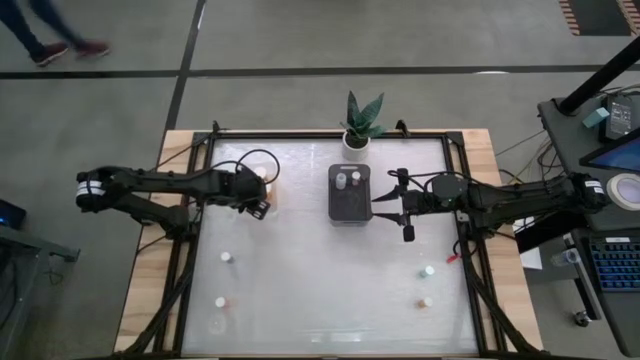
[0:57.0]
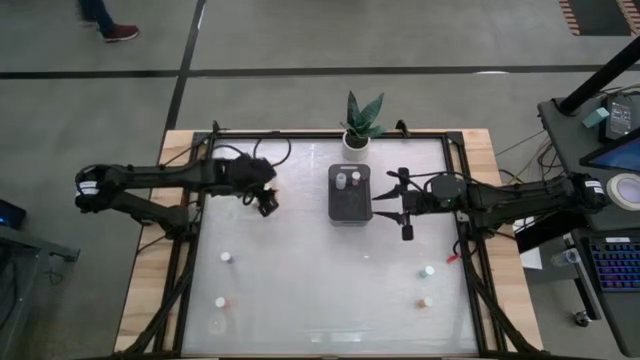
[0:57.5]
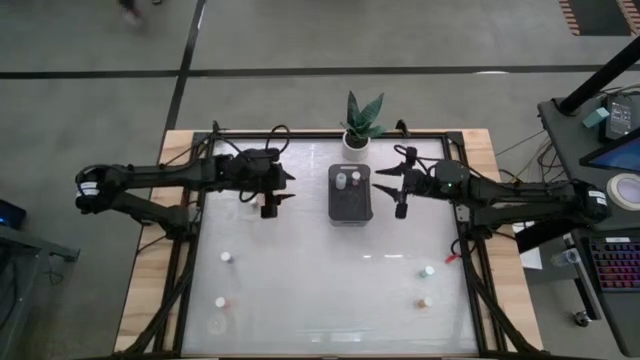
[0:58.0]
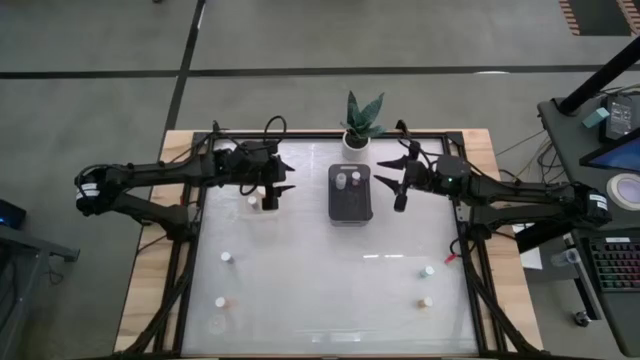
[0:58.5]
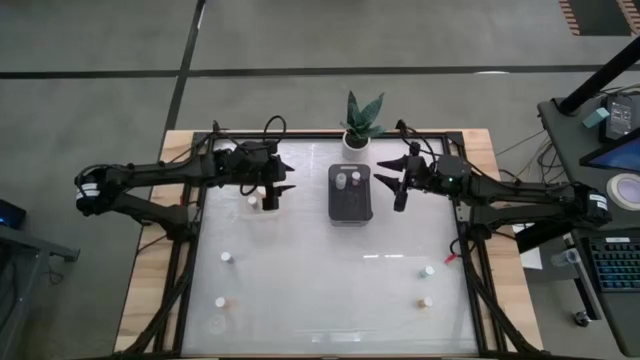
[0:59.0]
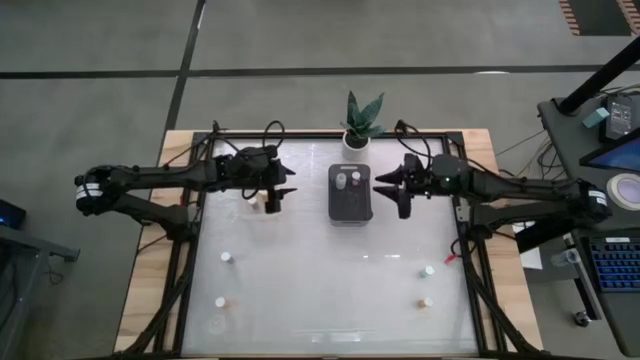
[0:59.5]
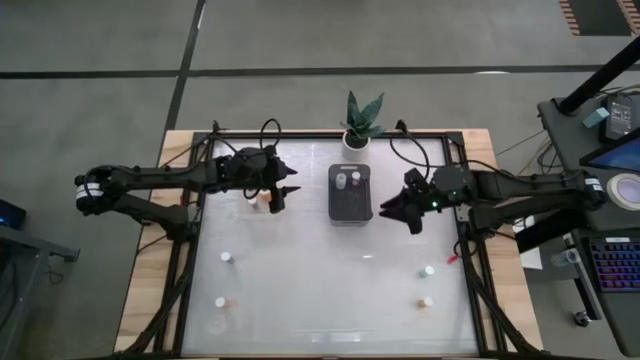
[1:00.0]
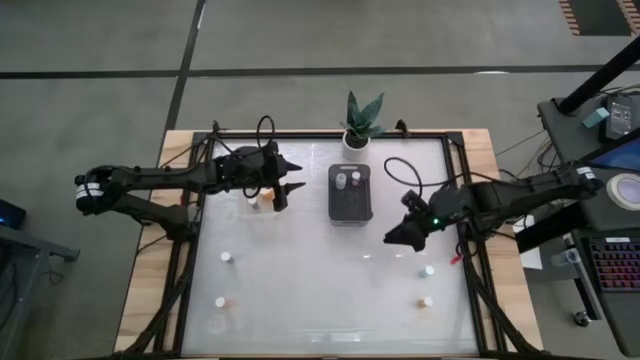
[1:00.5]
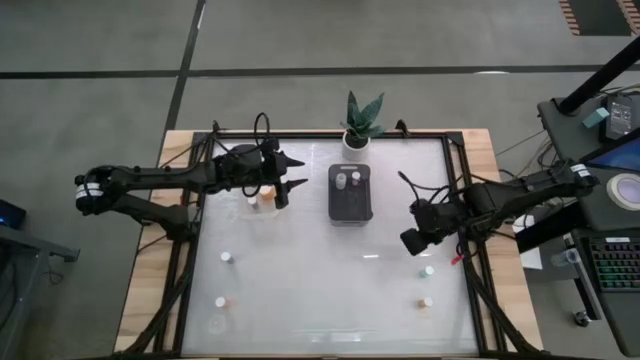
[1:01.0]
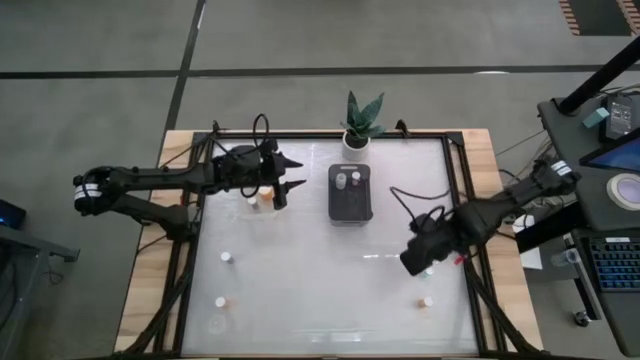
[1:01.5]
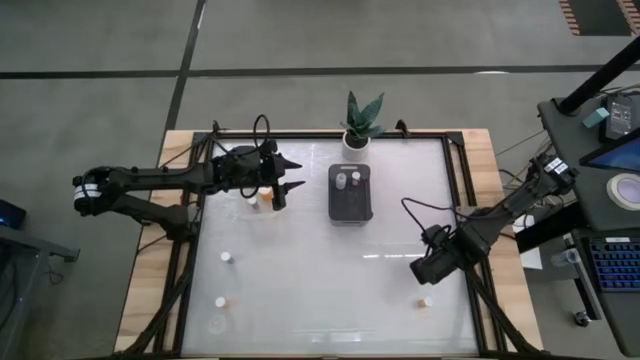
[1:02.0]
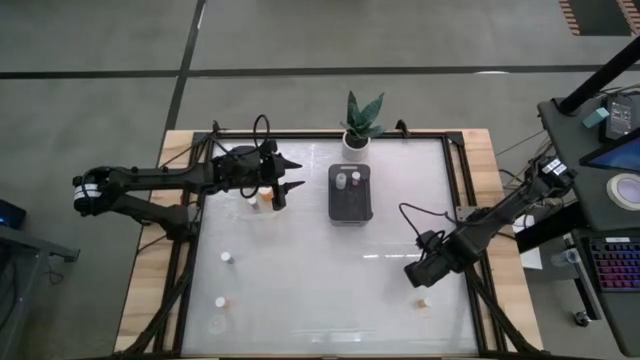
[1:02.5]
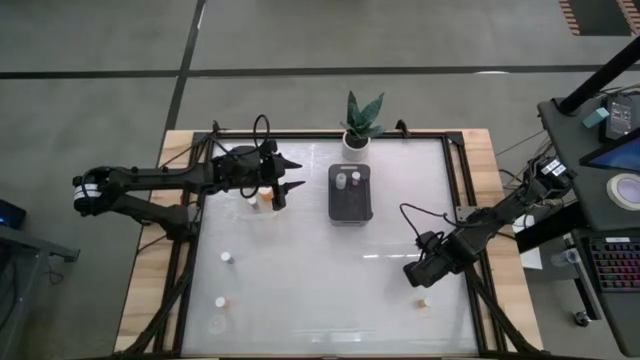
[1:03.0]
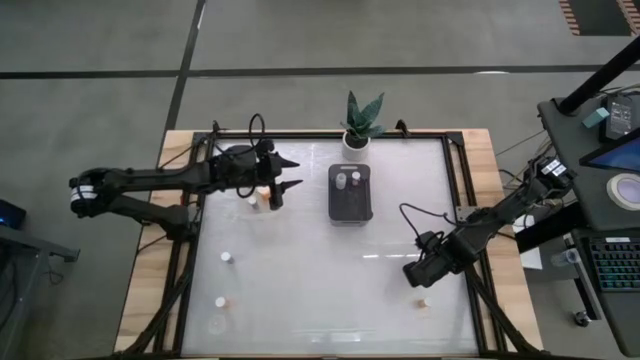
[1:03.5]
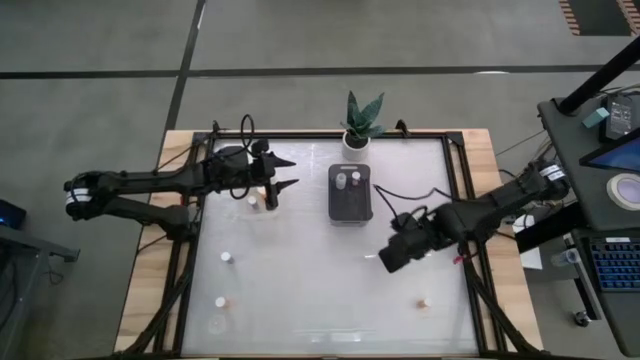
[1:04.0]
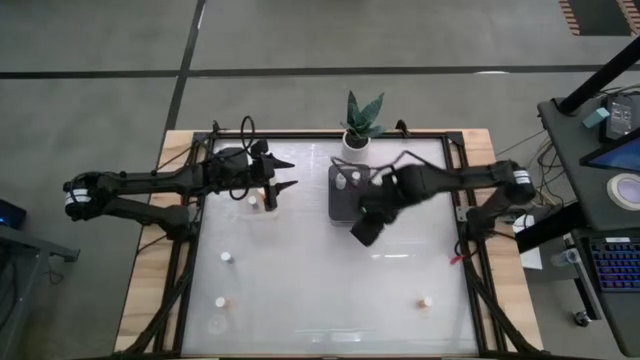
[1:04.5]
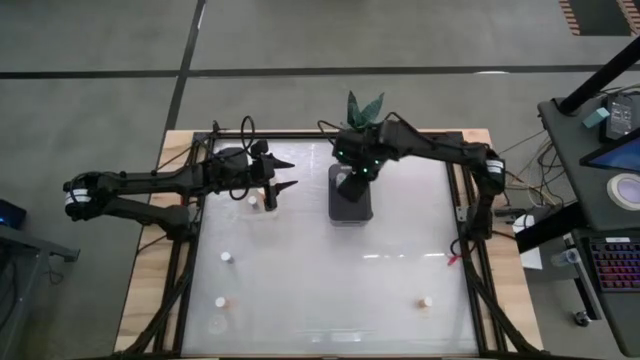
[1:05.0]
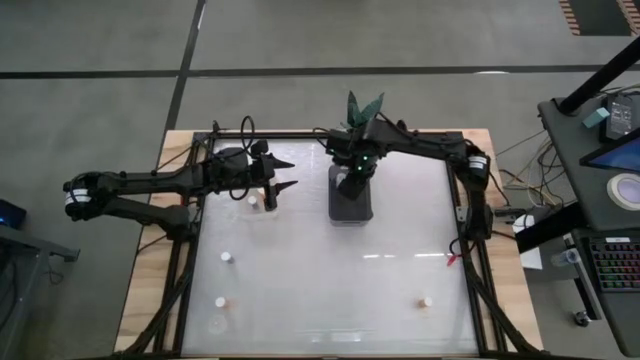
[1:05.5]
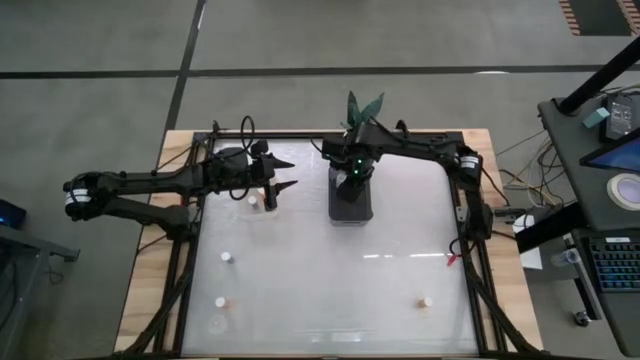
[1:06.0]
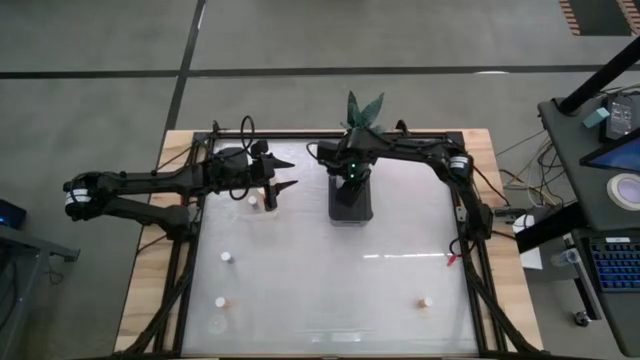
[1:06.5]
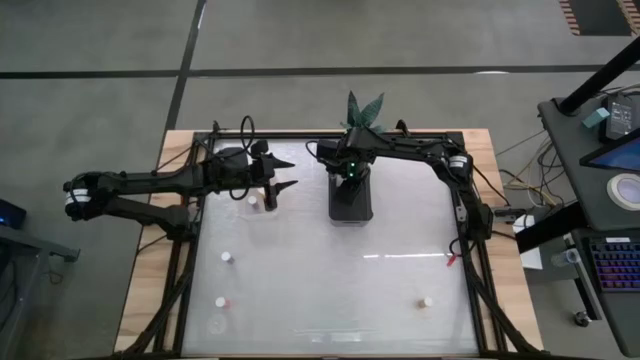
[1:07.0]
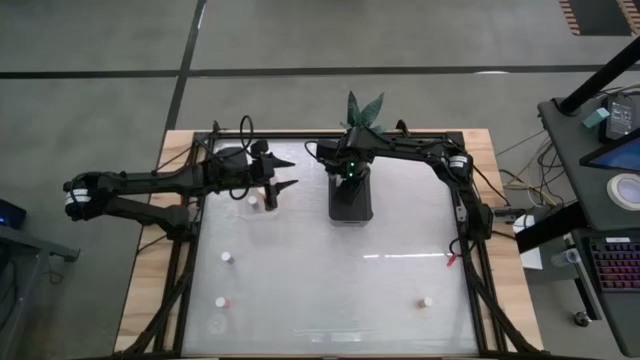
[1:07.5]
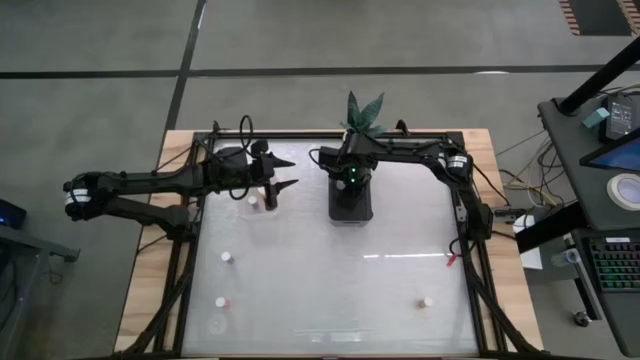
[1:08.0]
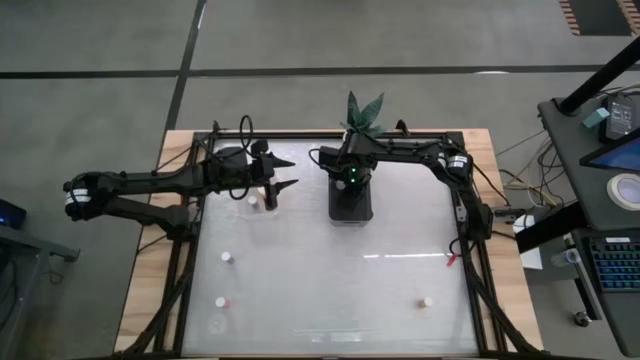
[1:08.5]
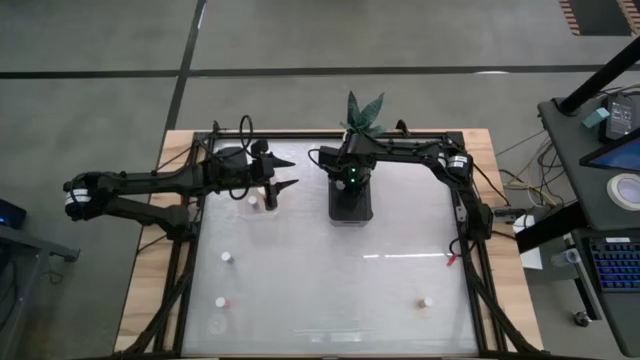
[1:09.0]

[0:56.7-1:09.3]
Task: Pick and place medicine bottles into bin by pill shape (circle, oval)
Put the bottom right blue pill bottle into the black bin

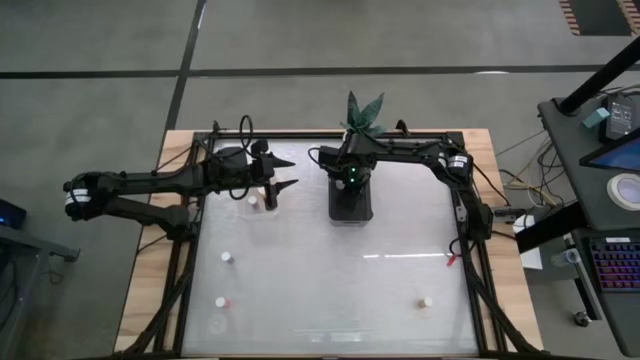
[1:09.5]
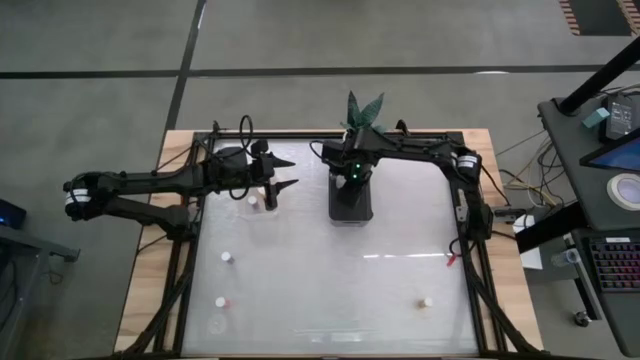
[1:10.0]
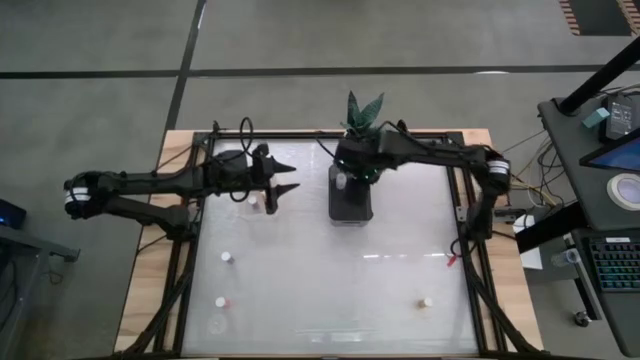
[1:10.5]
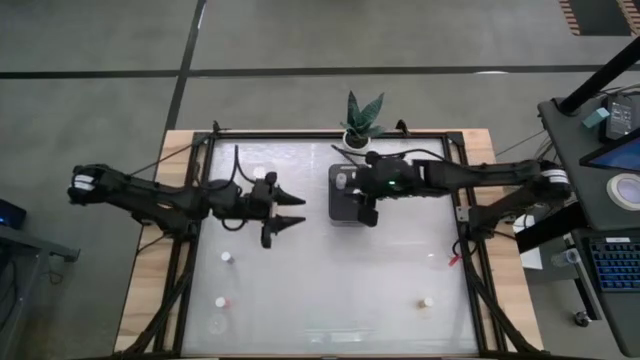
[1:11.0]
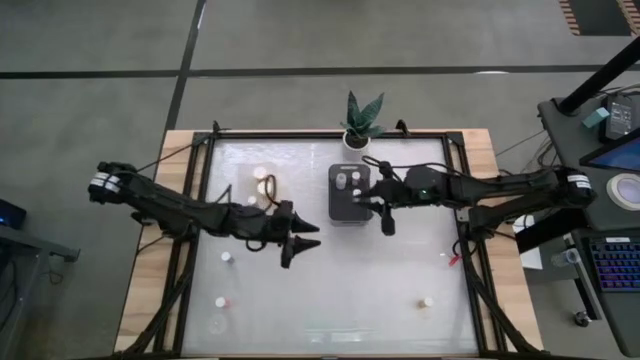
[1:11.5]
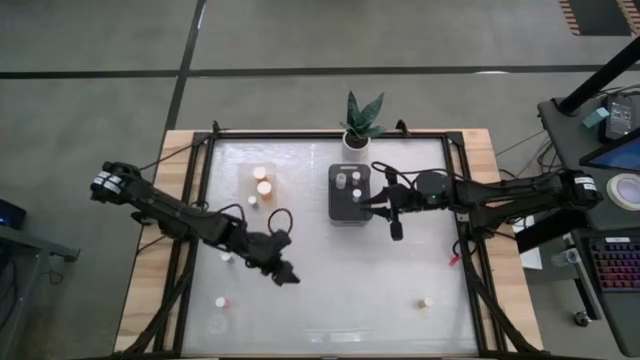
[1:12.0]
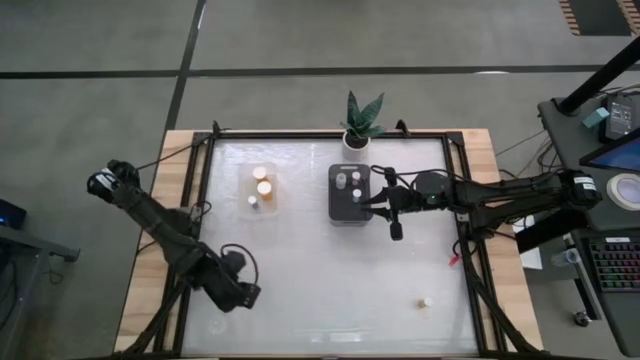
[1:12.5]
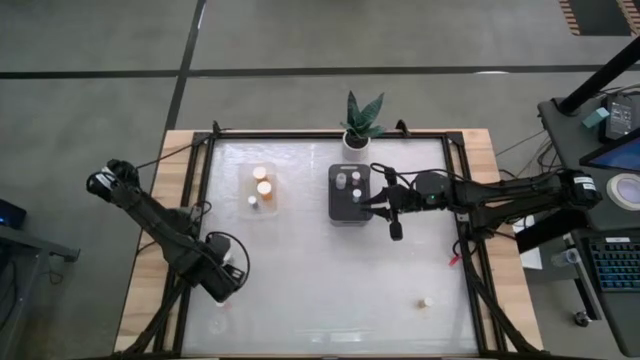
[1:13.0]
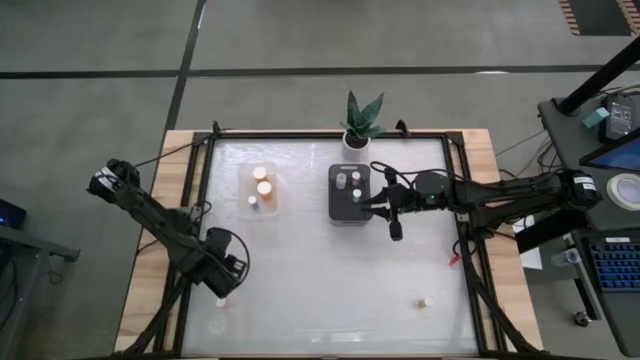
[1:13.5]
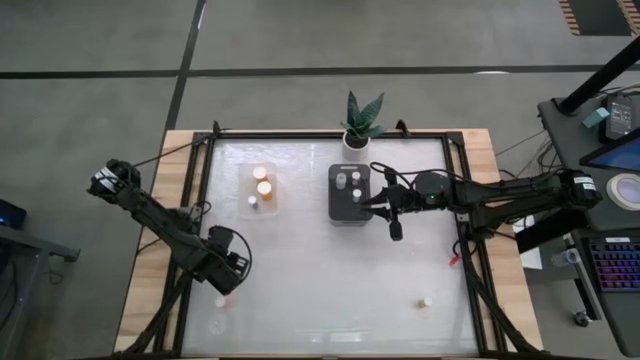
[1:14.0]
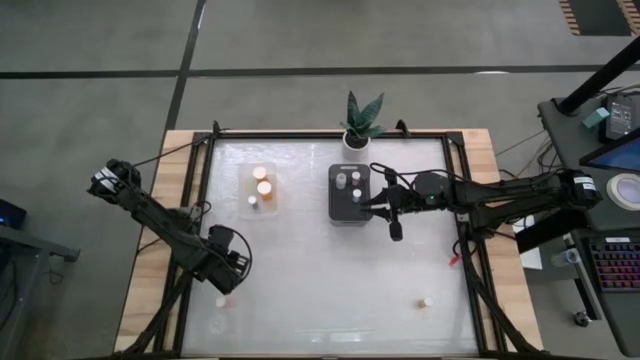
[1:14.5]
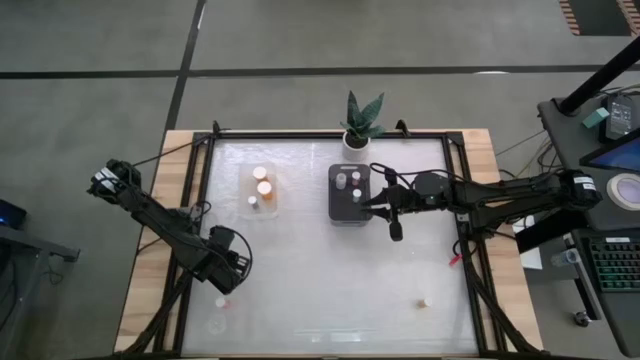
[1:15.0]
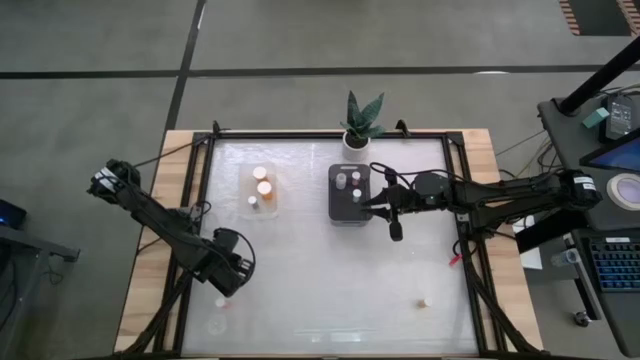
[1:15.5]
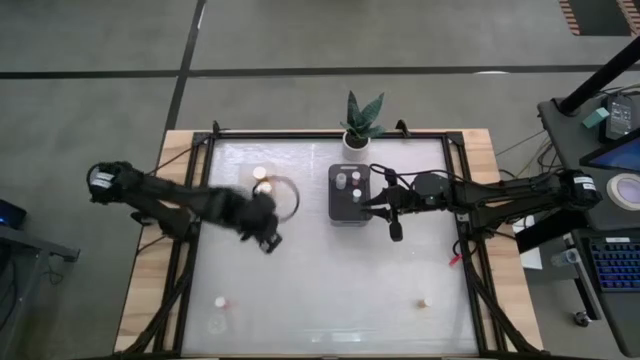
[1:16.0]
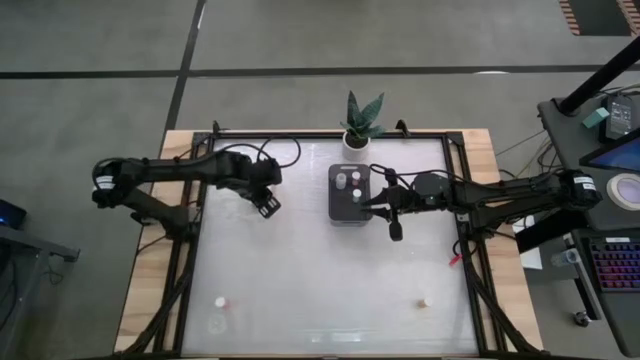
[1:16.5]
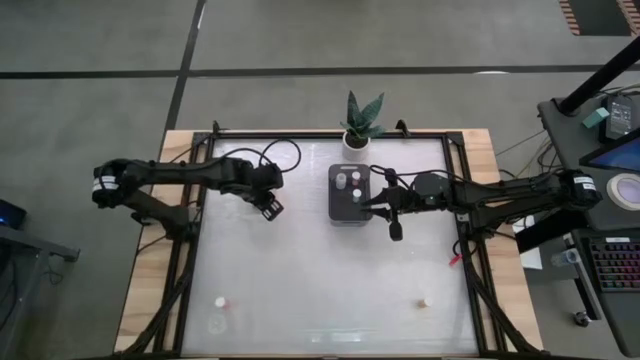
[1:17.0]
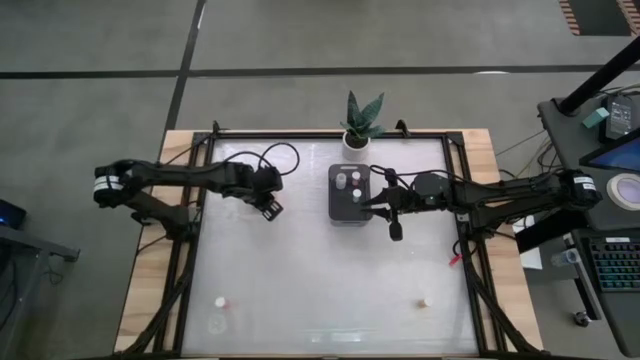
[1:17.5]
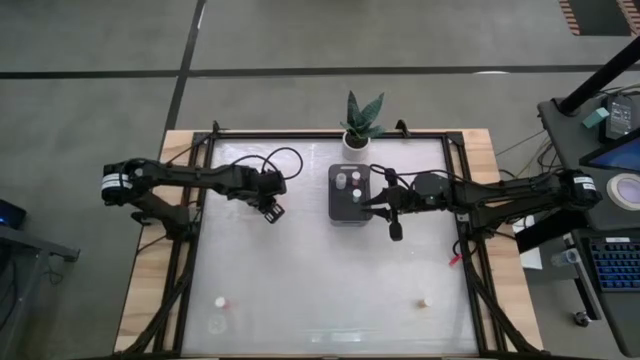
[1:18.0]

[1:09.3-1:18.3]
Put the blue pill bottle into the transparent bin
